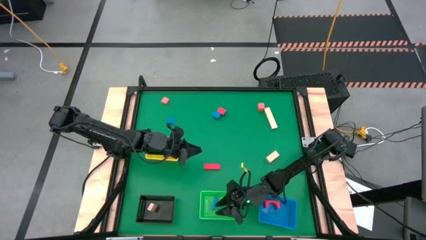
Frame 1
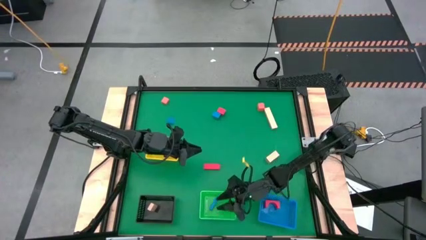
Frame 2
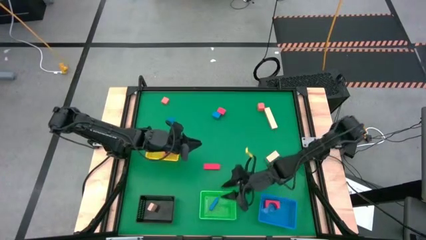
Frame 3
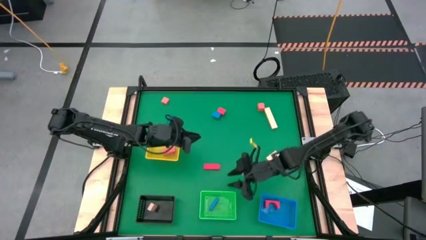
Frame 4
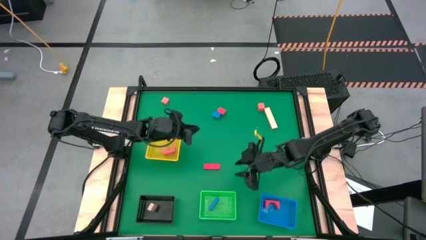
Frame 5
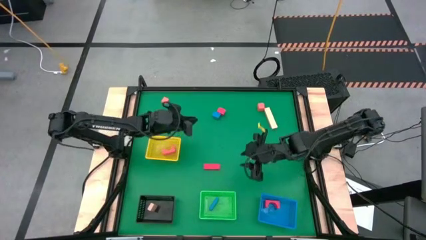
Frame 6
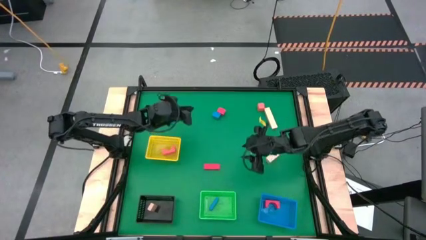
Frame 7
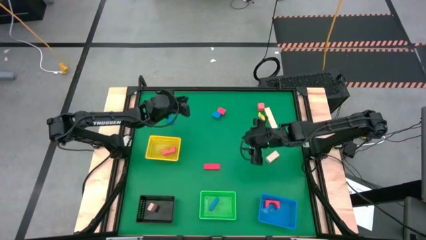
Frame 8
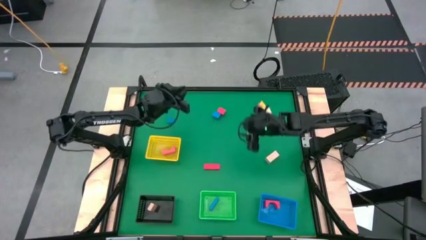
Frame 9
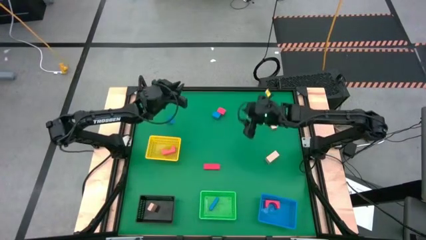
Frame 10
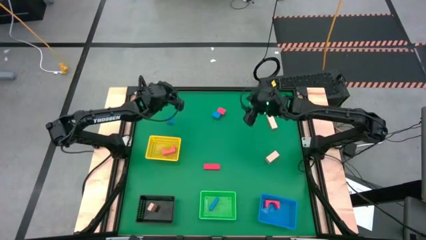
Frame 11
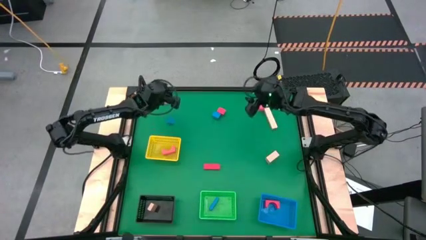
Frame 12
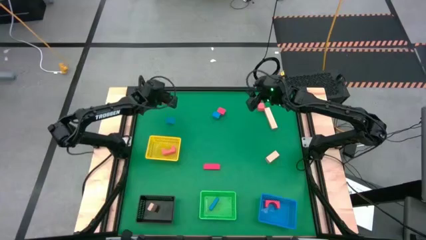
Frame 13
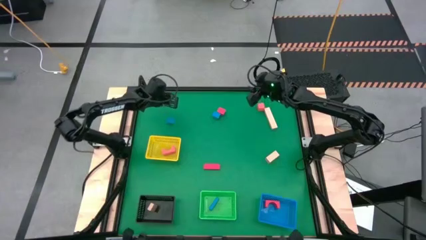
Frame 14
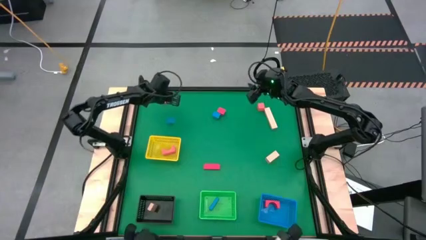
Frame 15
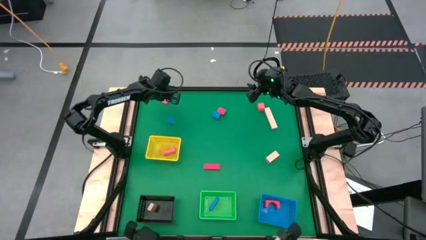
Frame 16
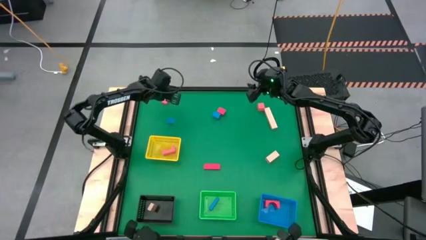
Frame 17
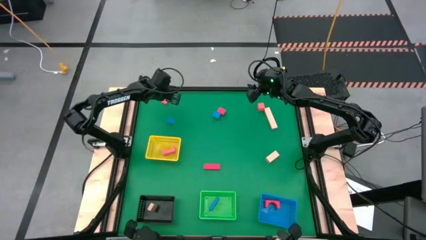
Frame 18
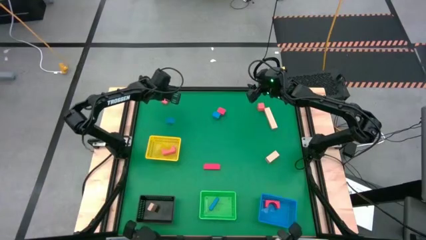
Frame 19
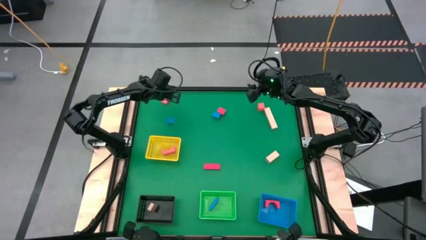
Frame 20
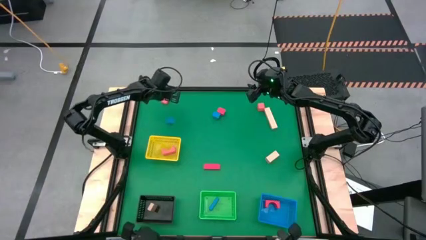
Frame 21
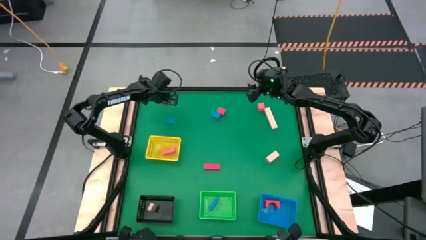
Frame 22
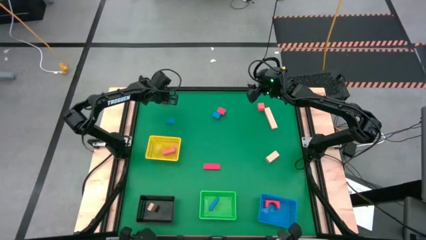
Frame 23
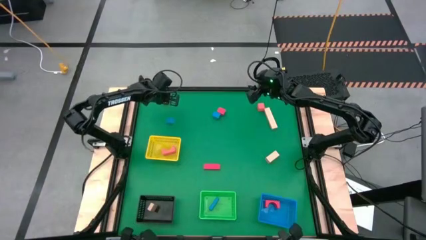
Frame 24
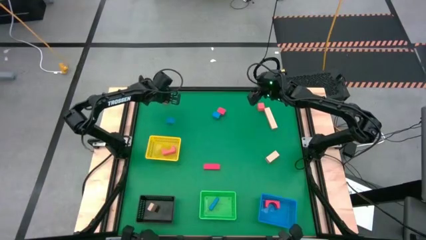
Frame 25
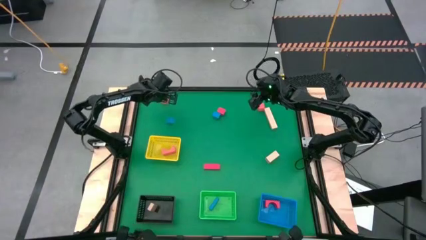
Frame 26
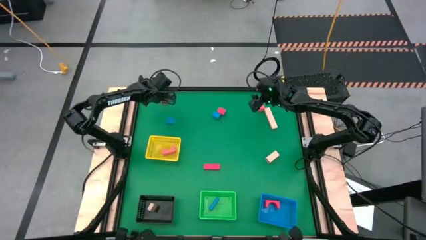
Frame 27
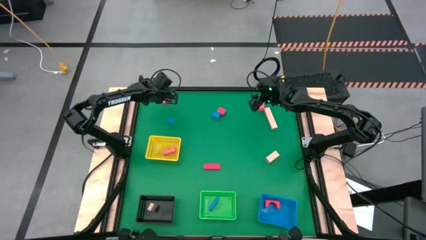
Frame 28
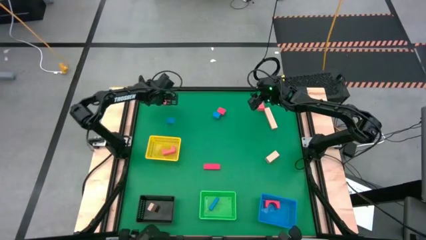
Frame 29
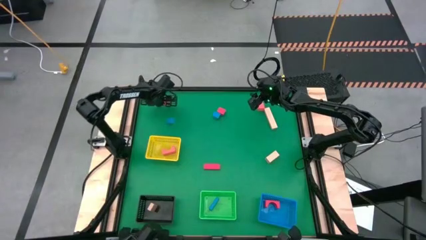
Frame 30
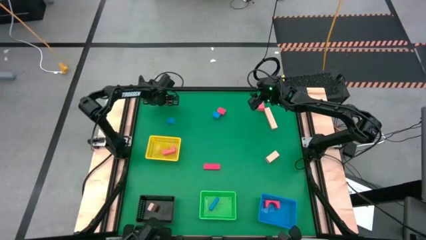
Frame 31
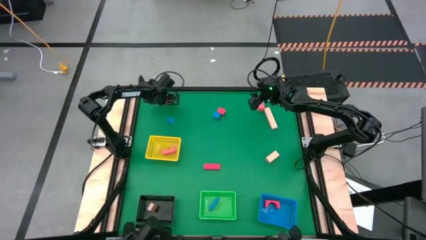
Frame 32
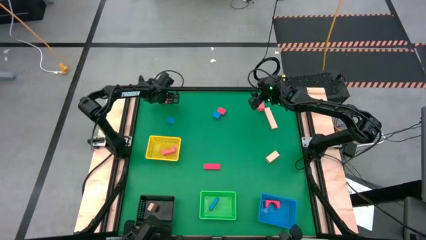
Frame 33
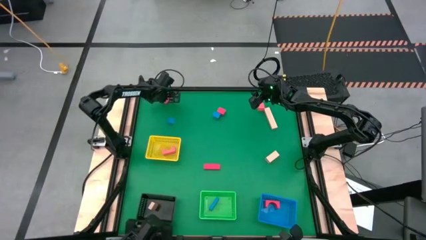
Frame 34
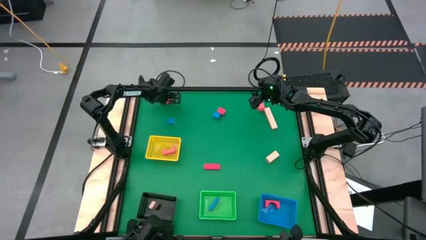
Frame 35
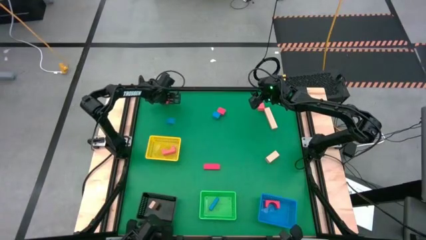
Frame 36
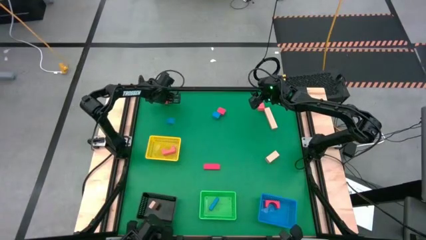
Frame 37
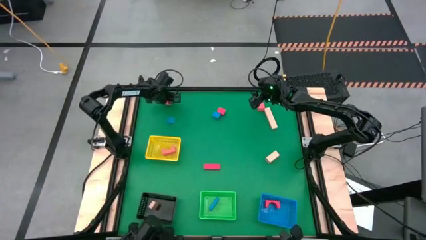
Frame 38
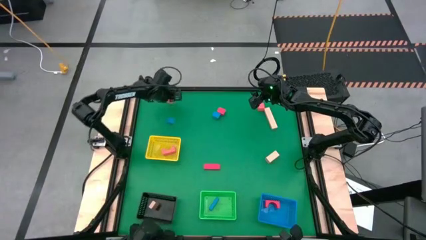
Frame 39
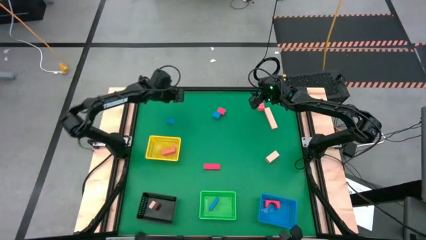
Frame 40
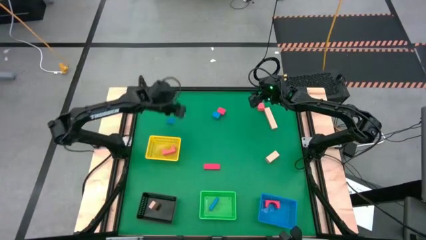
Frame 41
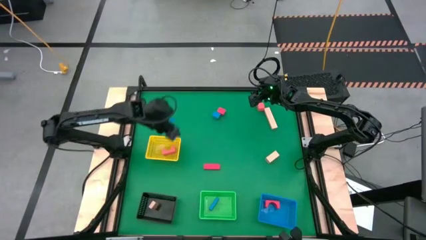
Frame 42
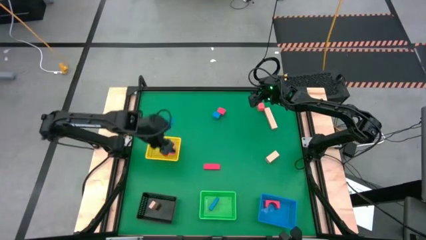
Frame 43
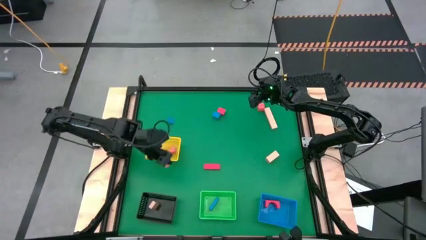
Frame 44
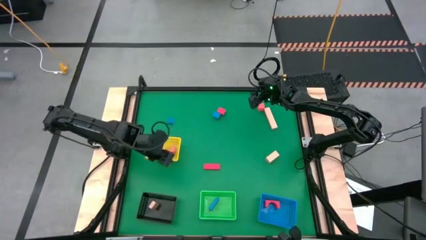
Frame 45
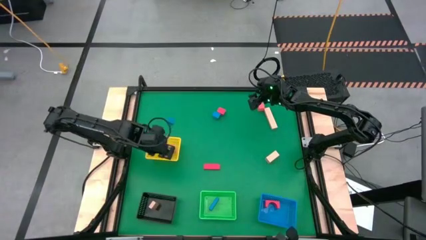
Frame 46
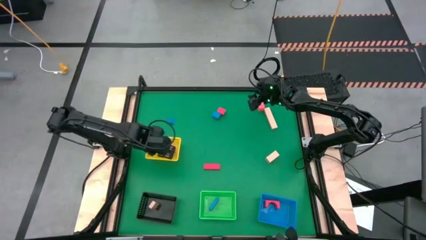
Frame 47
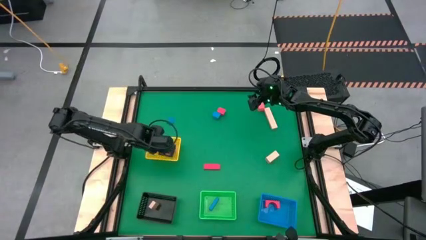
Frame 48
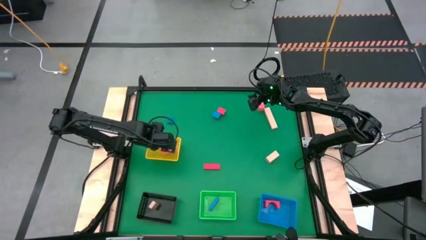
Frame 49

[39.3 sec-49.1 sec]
Task: Sort & place blocks by color
Put the orange square block into the yellow bin

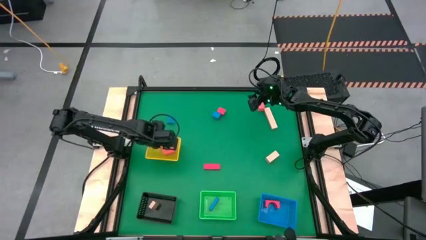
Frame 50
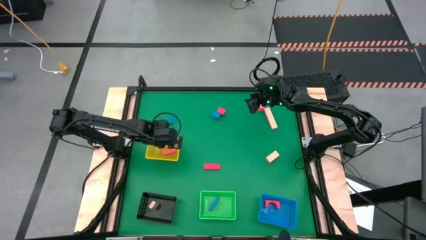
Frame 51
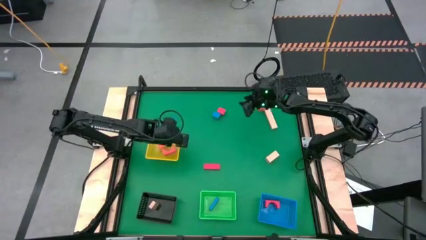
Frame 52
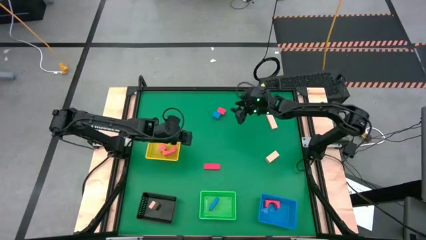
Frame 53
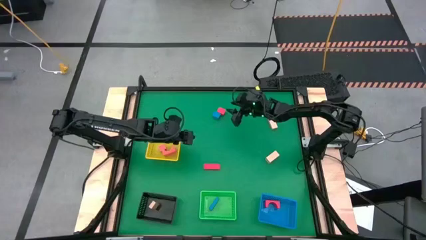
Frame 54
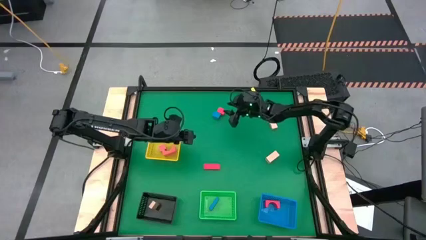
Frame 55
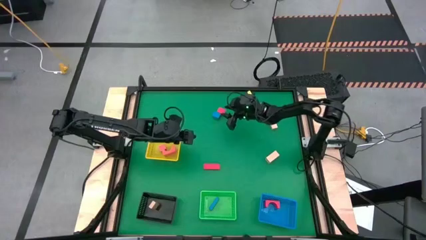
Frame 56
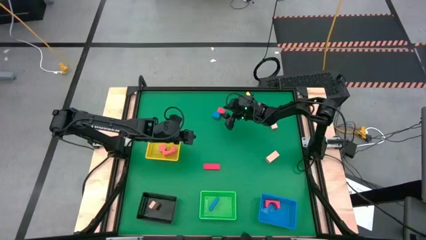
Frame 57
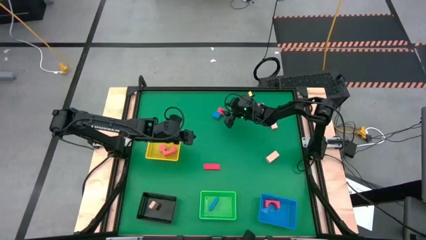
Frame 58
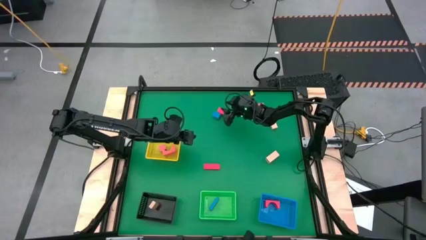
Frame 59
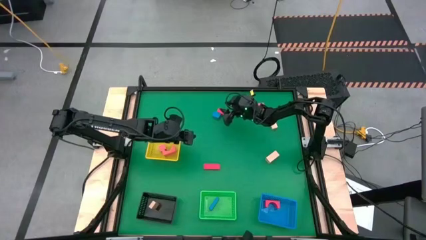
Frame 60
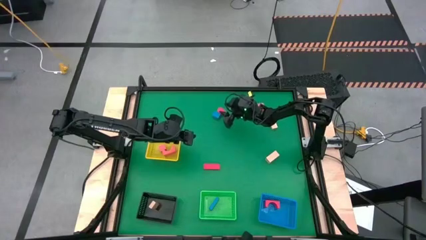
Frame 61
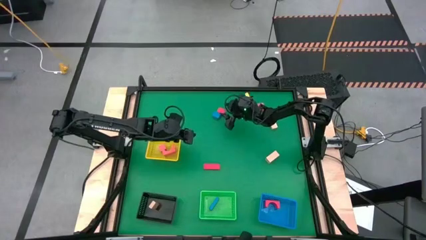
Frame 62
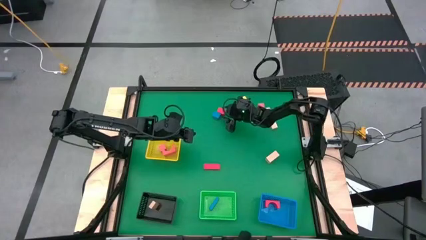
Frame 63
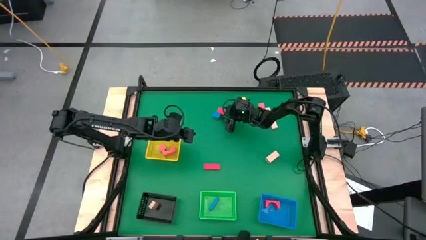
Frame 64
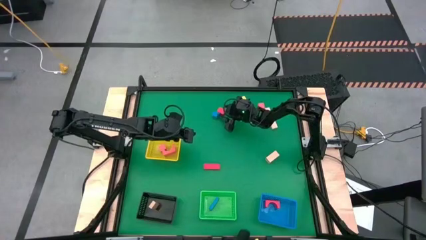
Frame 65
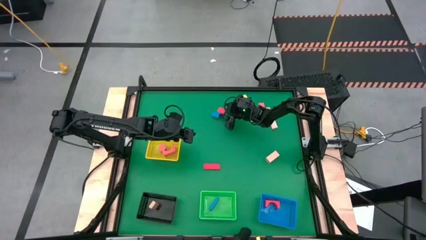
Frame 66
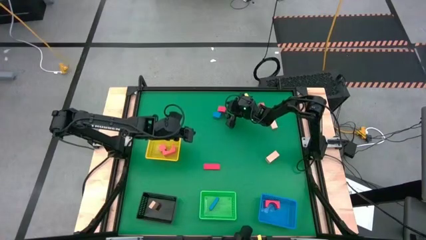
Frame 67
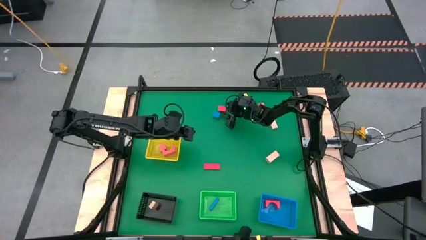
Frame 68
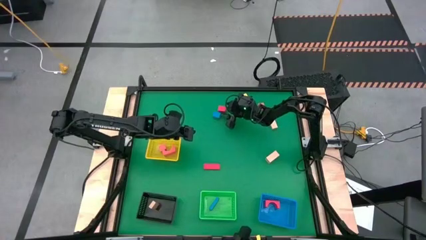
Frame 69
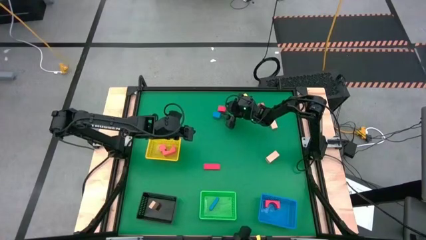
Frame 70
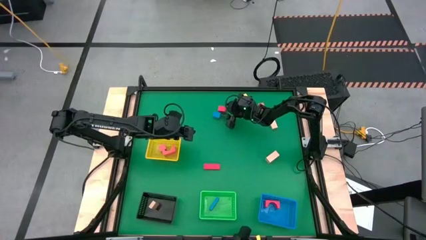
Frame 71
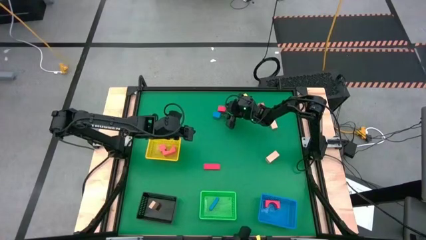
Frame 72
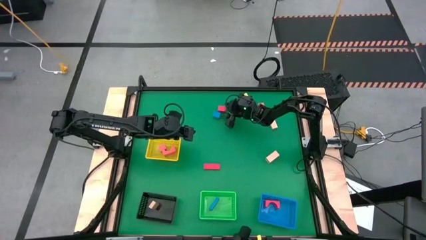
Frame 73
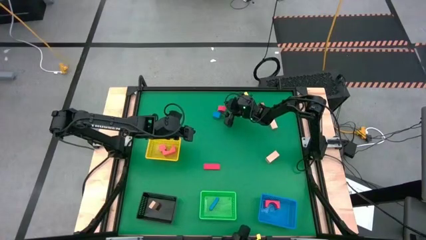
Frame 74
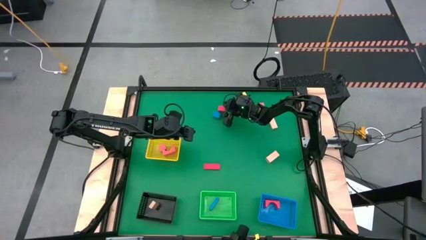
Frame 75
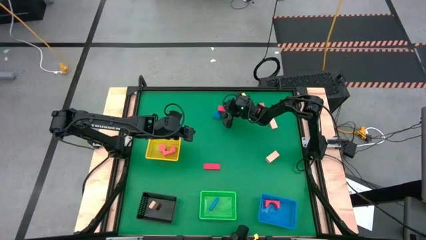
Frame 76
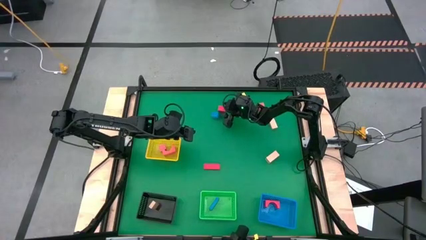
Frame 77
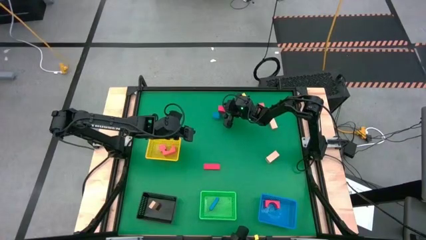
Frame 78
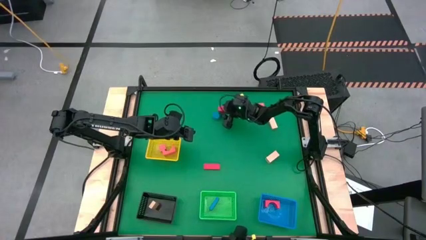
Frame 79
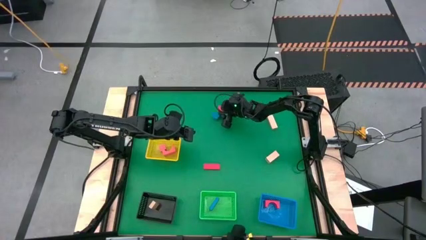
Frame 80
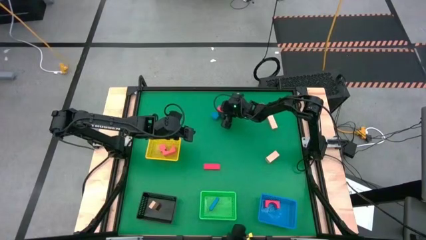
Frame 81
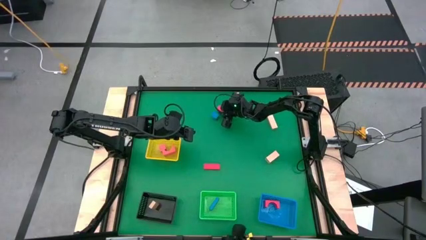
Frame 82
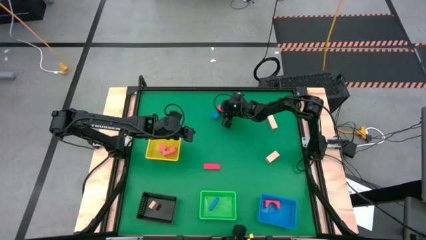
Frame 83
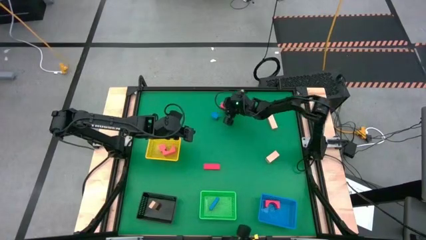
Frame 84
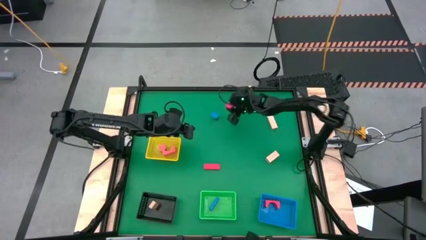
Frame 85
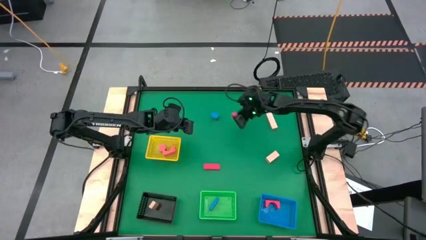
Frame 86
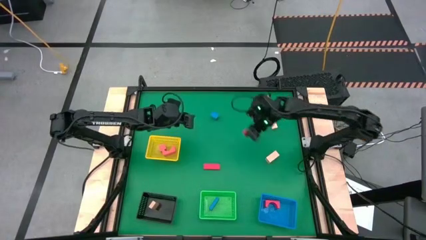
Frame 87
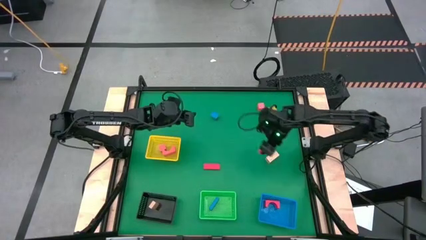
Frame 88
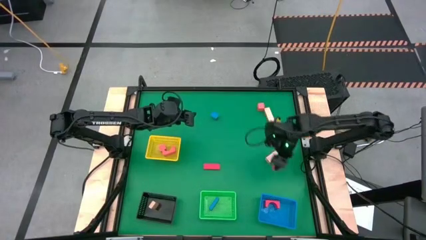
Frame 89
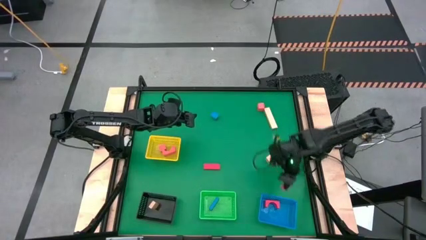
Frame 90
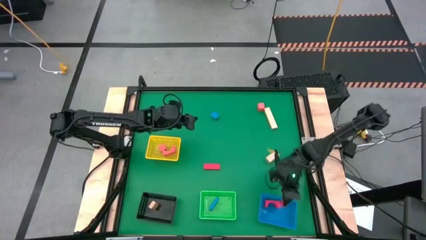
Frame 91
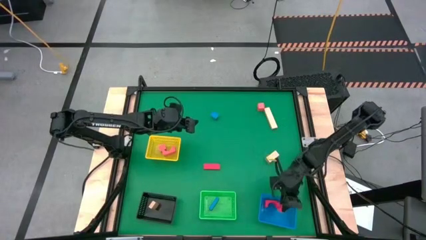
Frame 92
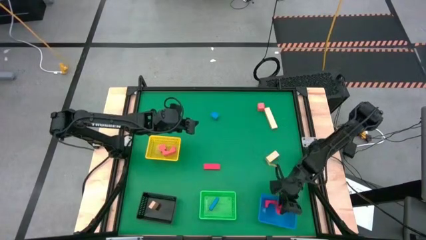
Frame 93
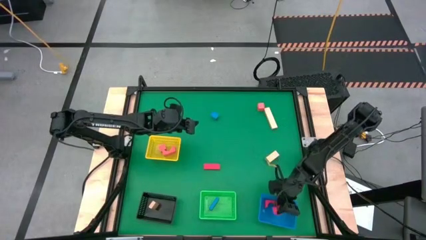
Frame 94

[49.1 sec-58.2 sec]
Put the red half-circle block into the blue bin
